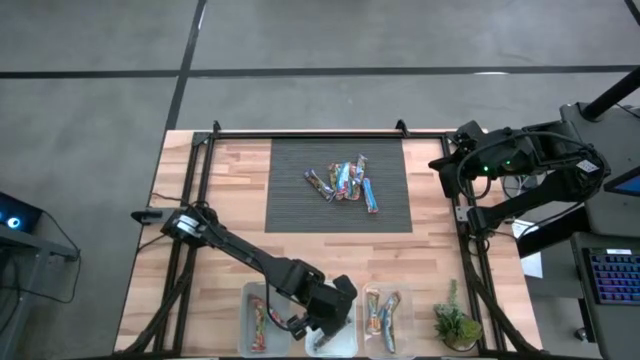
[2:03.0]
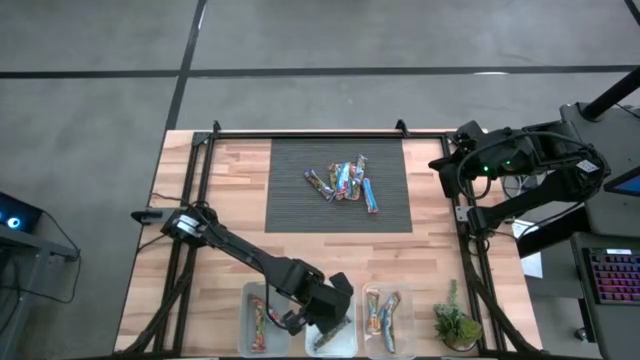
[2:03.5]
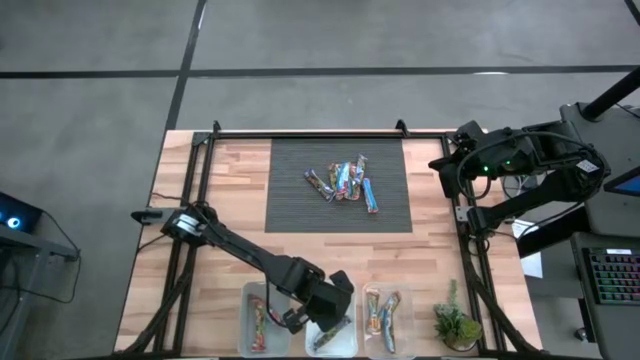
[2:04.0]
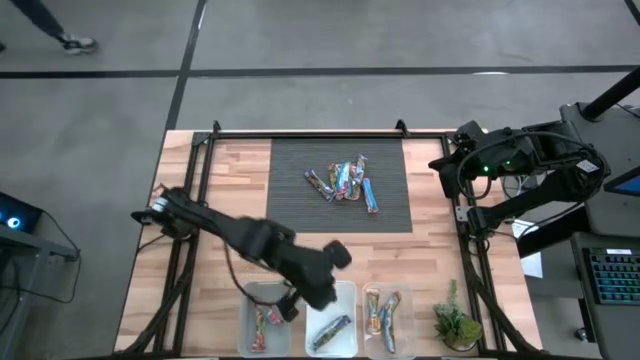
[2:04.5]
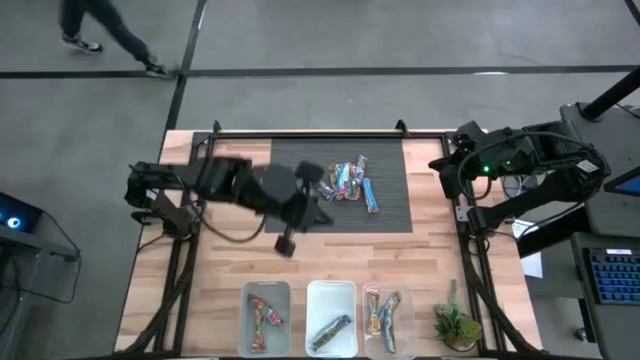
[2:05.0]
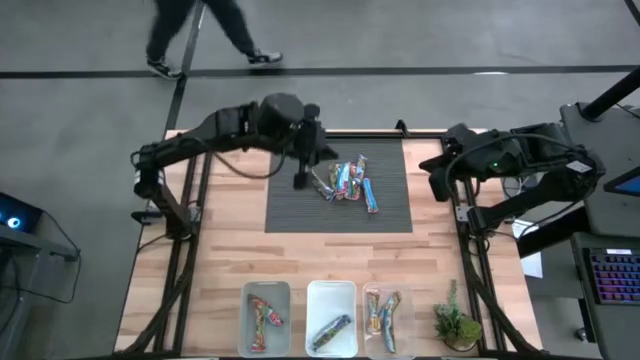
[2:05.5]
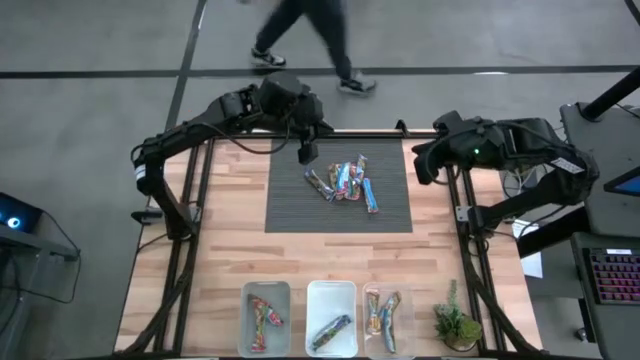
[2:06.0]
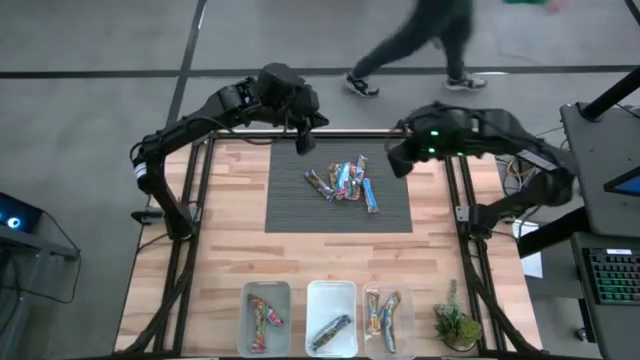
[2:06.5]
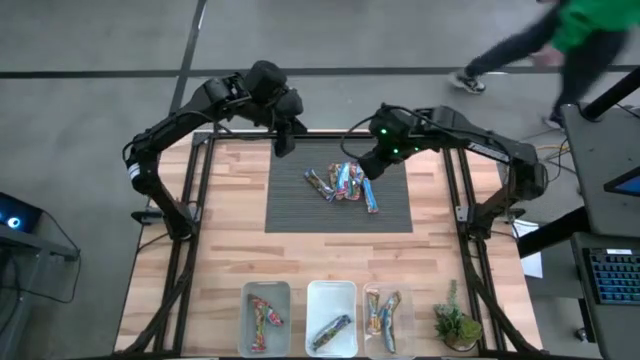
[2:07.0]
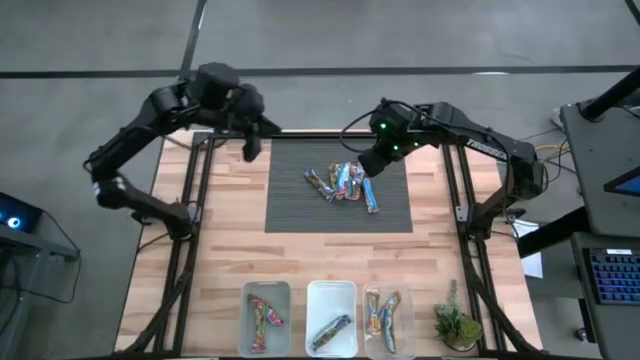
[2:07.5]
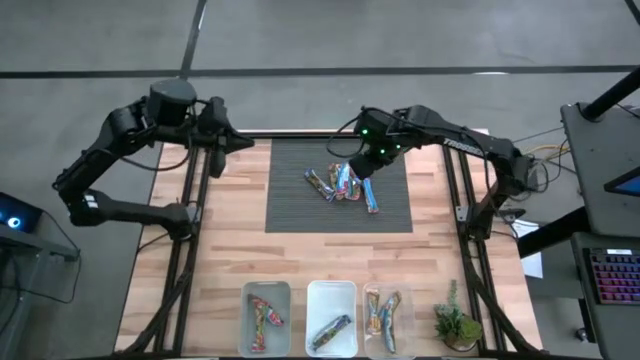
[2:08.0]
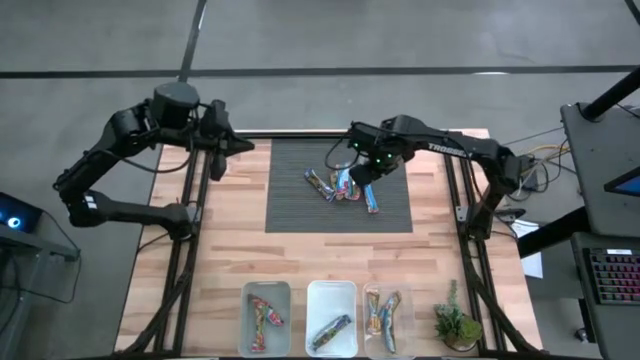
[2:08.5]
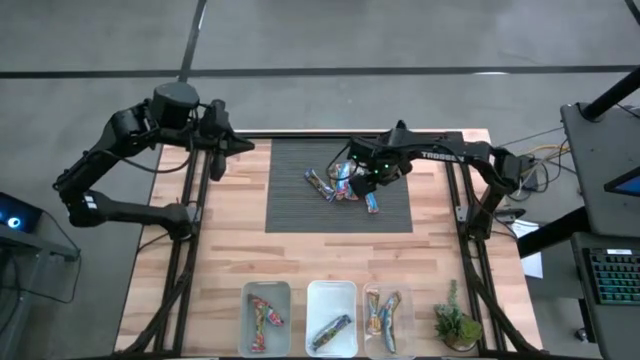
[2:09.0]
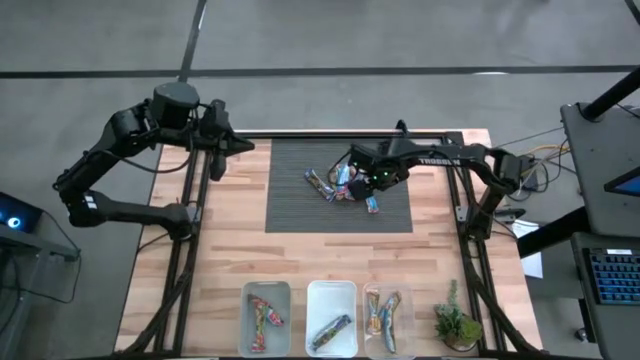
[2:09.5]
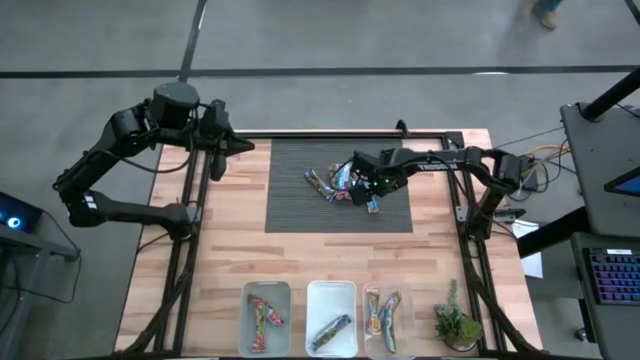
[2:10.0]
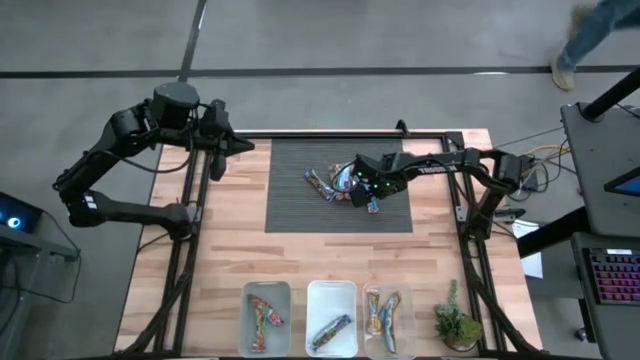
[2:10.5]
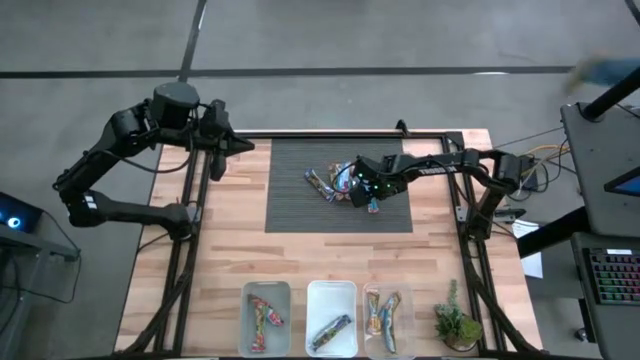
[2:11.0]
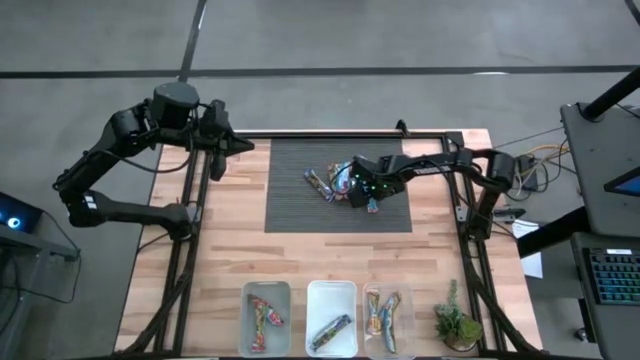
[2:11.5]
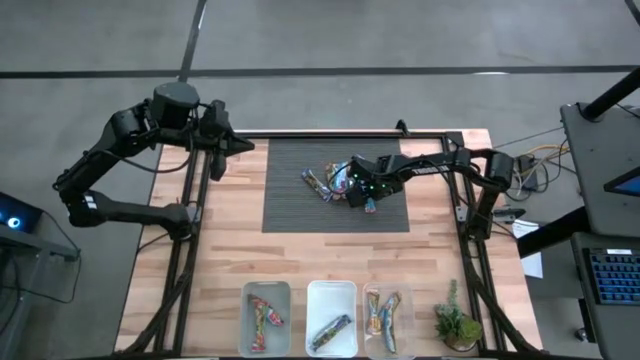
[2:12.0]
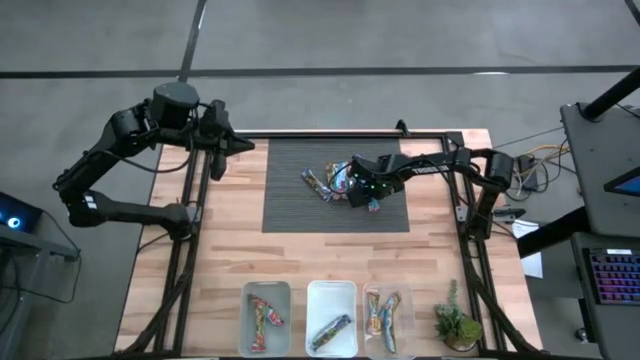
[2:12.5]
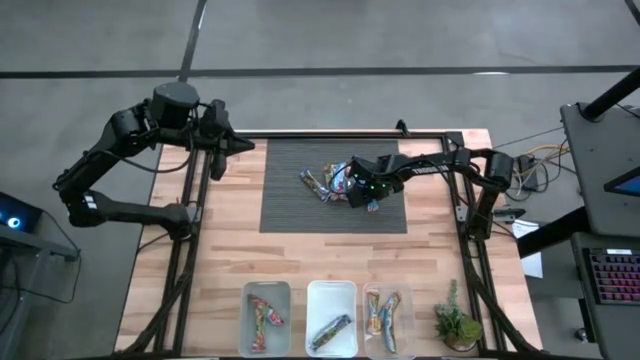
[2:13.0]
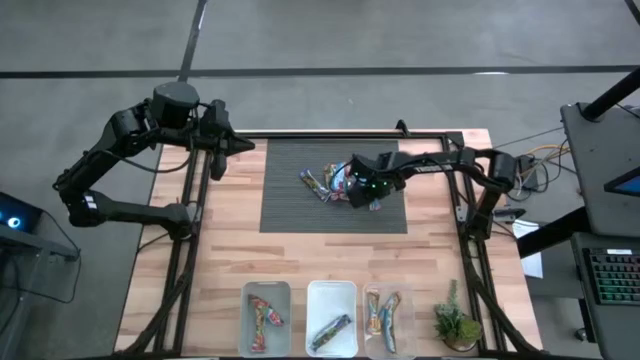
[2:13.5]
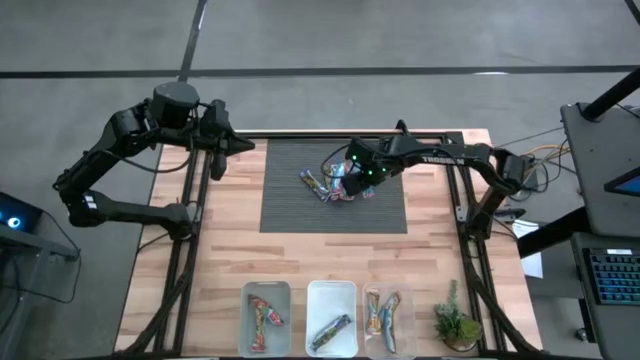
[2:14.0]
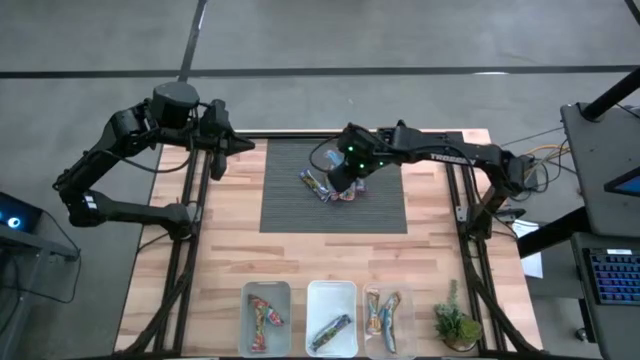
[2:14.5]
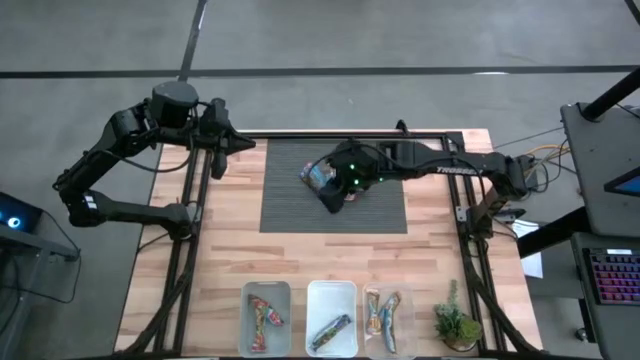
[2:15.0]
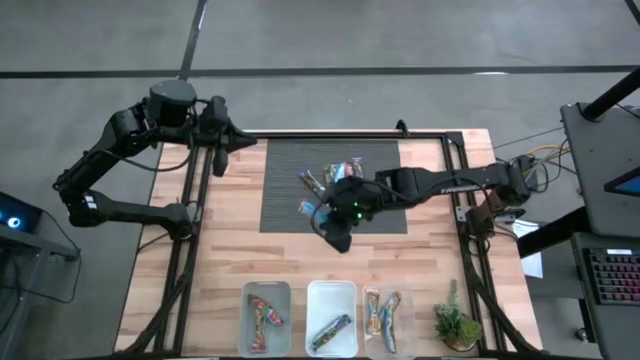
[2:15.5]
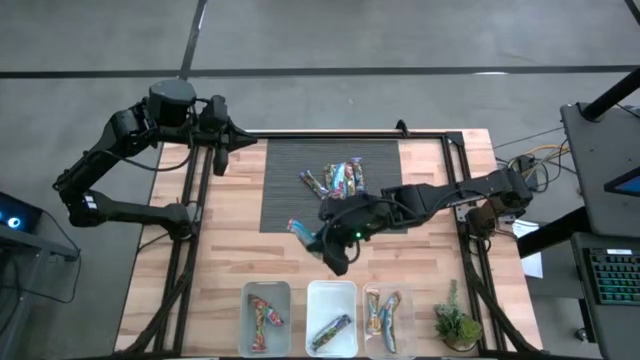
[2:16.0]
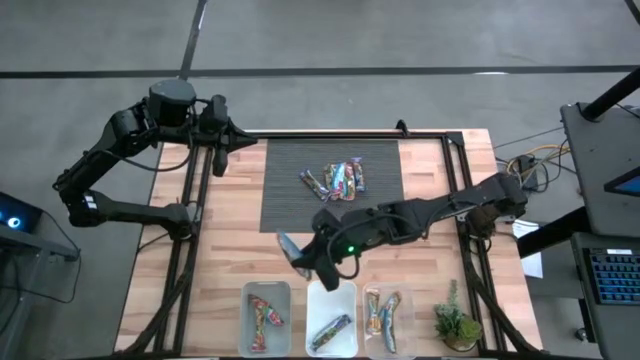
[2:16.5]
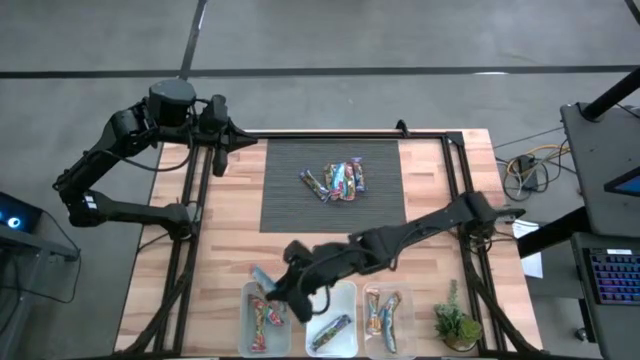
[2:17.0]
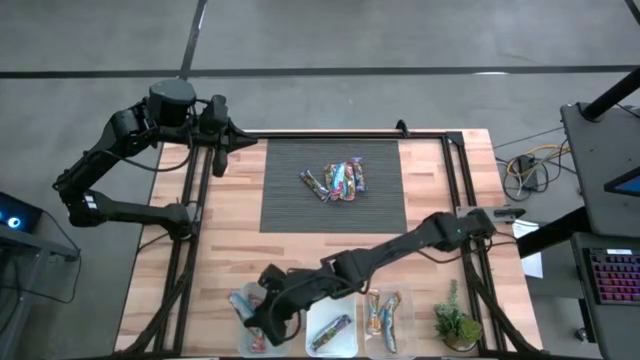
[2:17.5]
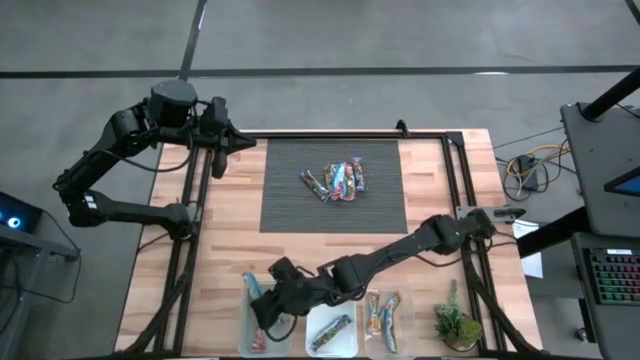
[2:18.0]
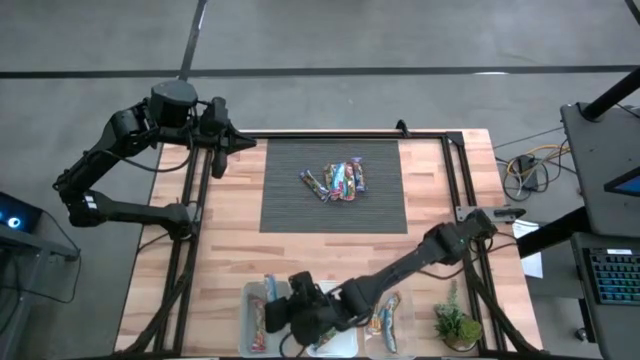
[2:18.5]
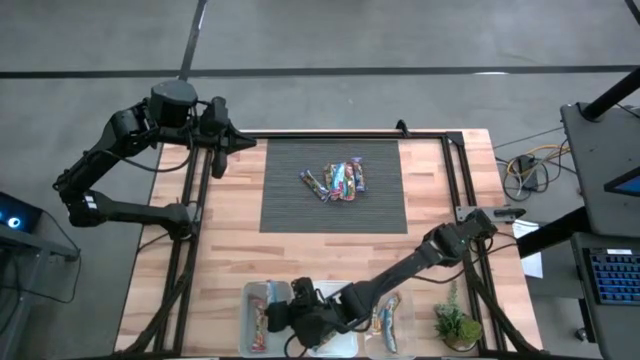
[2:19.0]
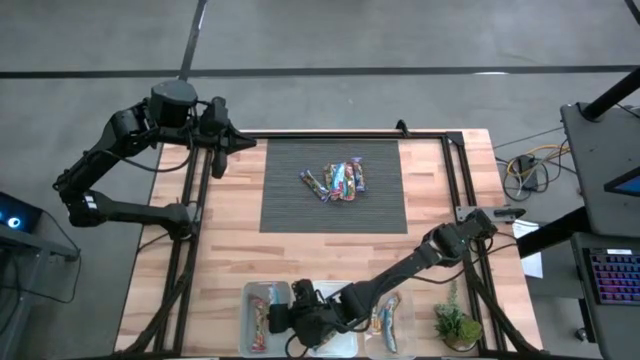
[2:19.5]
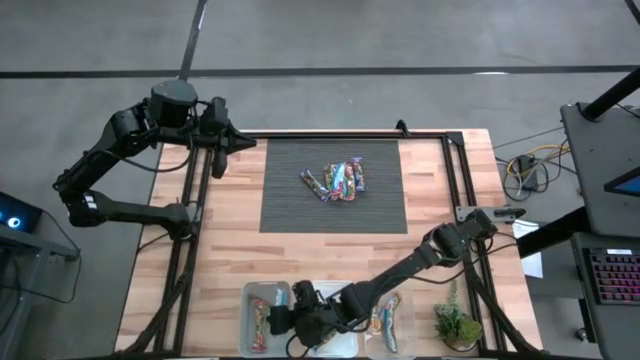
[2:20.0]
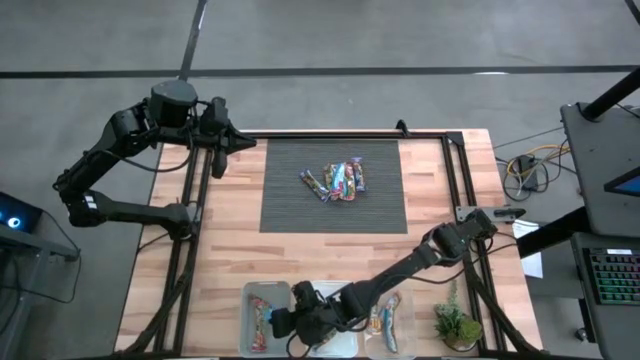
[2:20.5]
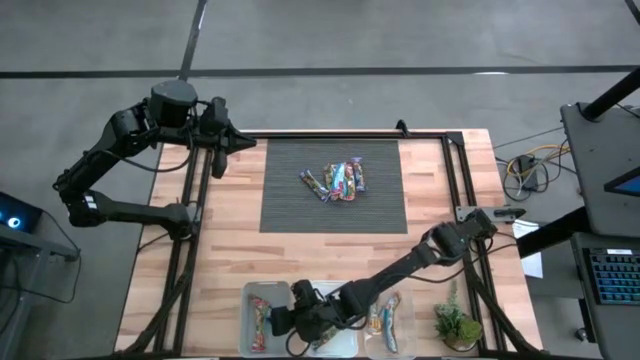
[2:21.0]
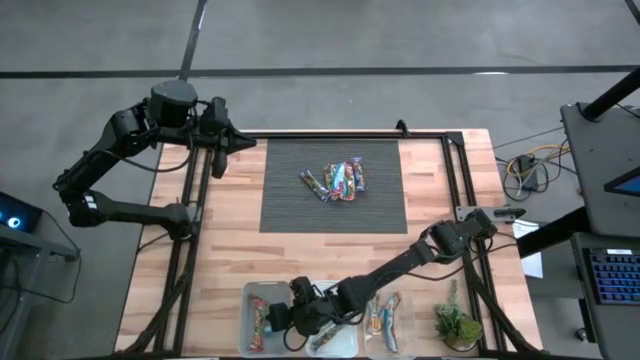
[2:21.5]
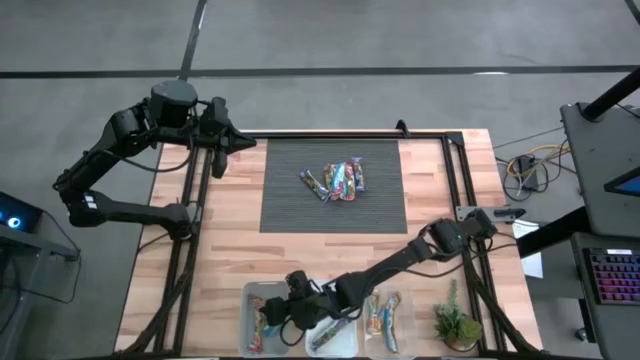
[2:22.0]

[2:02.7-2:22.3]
Task: Pick and place Granola Bars by type
Put the bottom red granola bar into the gray bin

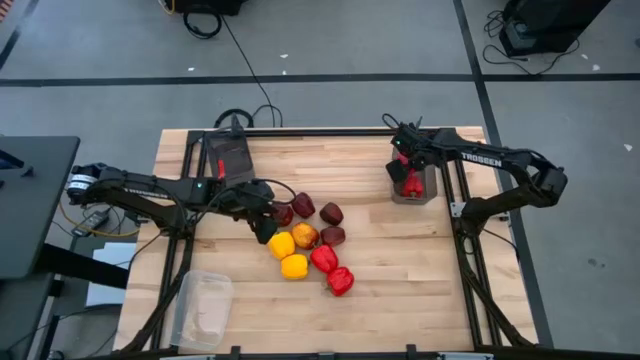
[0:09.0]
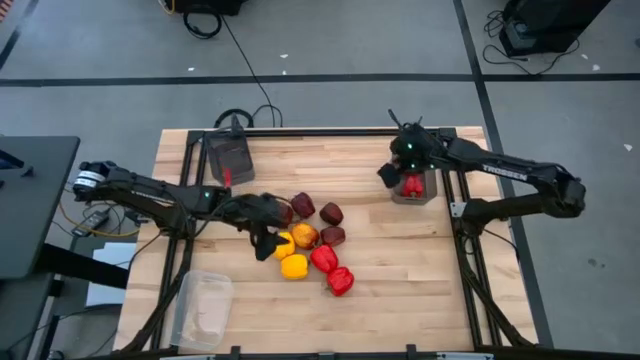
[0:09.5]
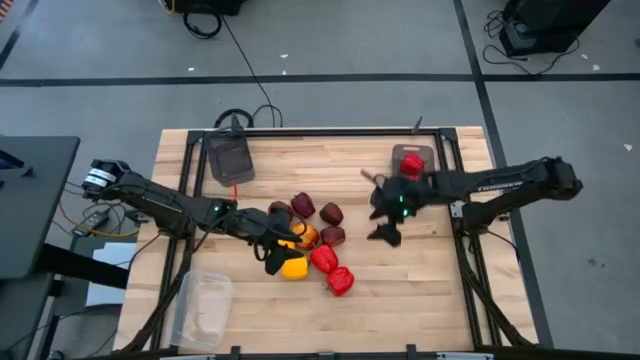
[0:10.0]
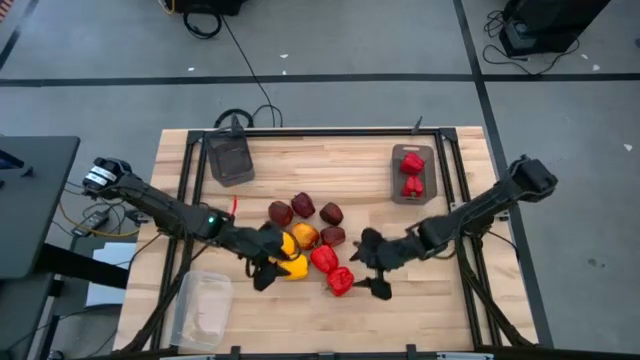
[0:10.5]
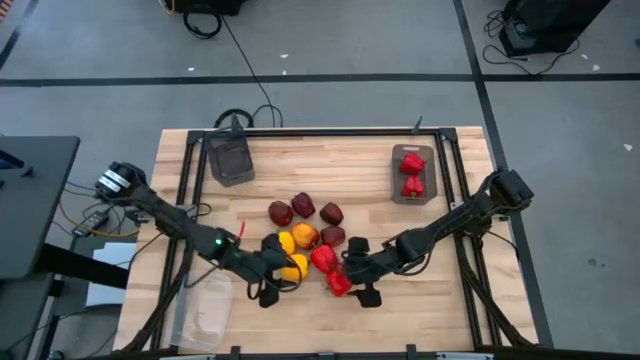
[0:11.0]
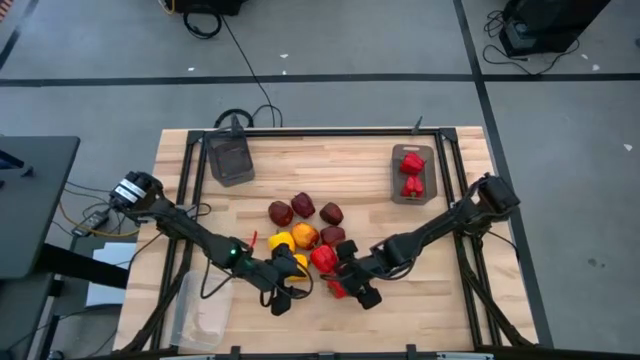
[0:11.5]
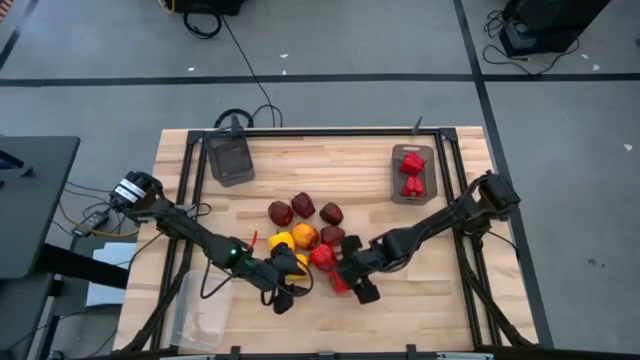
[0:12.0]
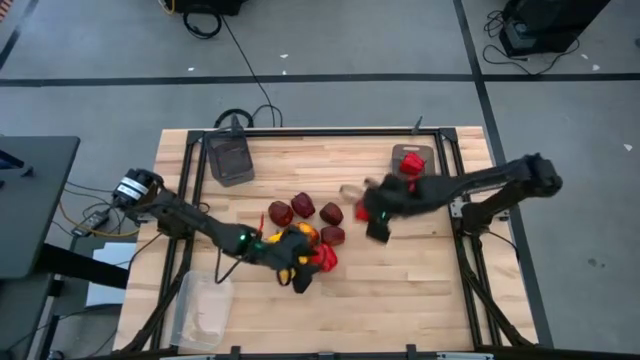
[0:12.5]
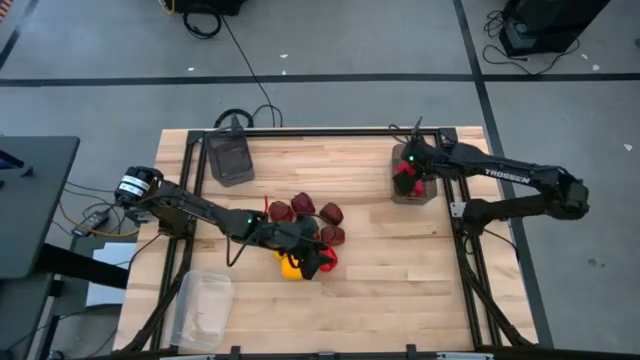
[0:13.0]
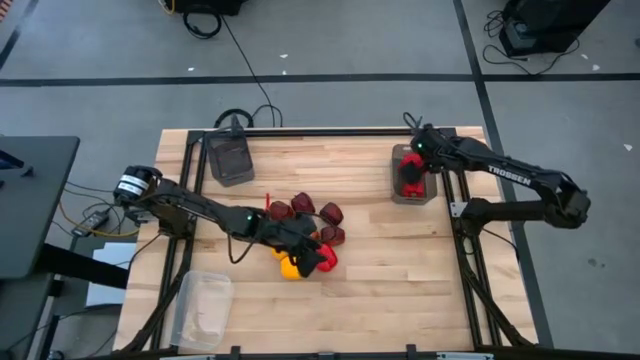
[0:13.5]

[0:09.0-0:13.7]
Task: Sort produce into baskets
Put the red bell pepper into the right black bin
